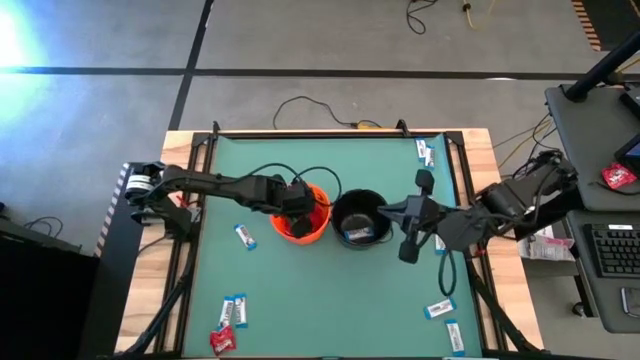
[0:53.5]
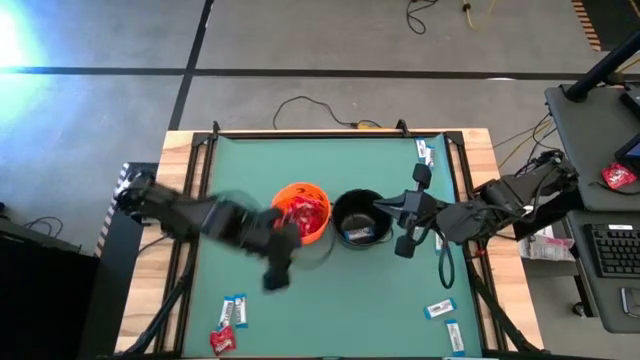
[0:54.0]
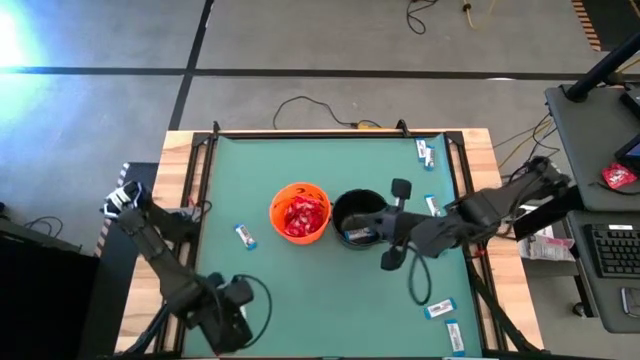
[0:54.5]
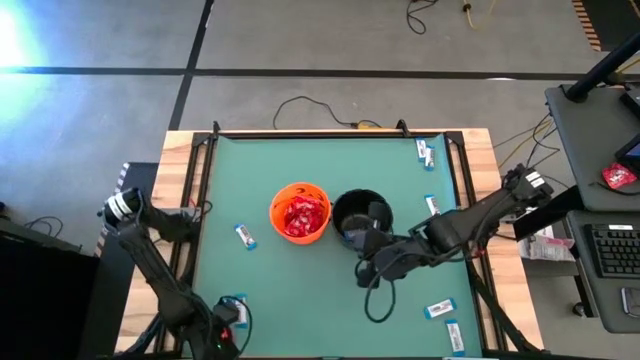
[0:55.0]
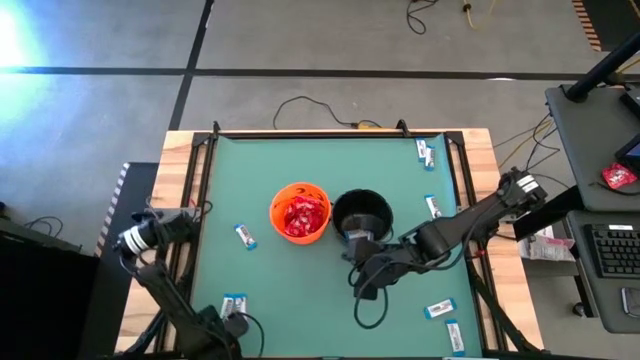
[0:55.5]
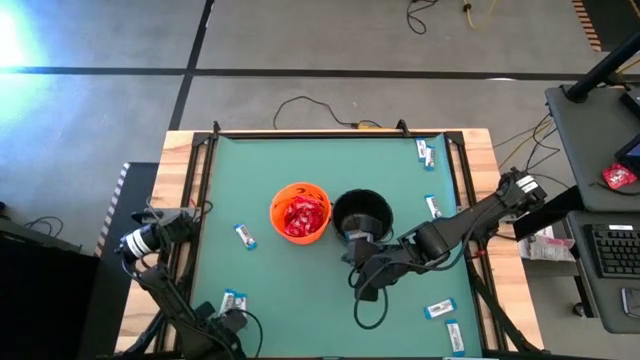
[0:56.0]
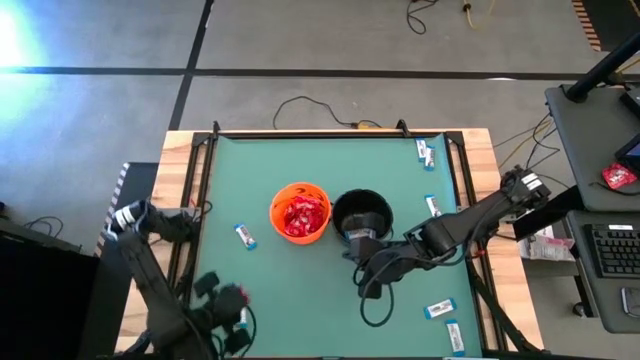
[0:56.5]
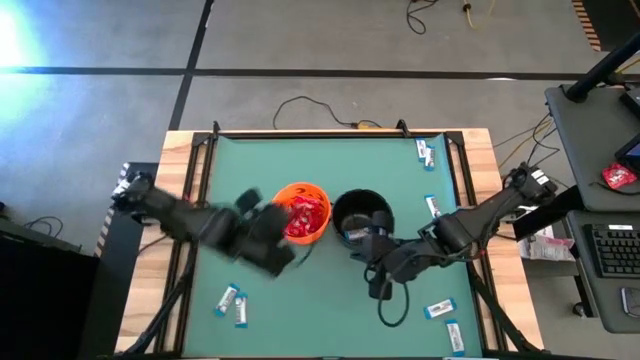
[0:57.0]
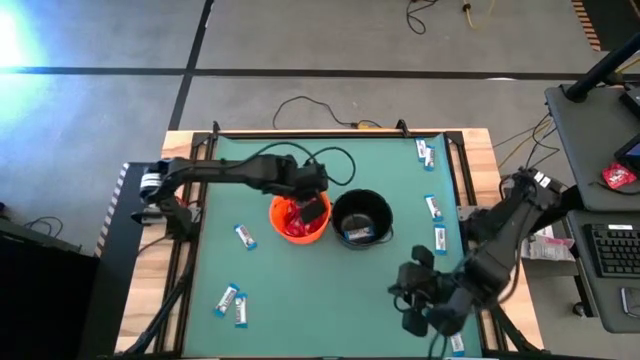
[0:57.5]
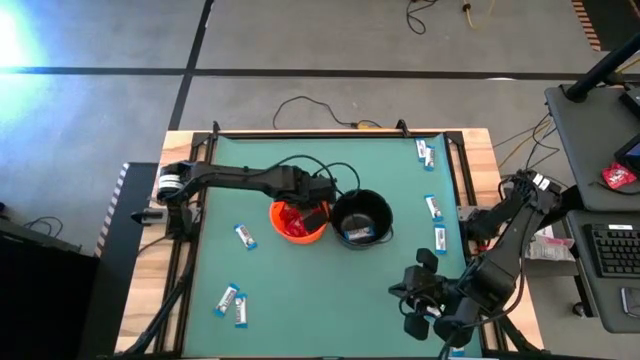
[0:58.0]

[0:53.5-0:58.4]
Task: Sort candy by brand, put in halloween buckets
Put the red candy into the orange bucket

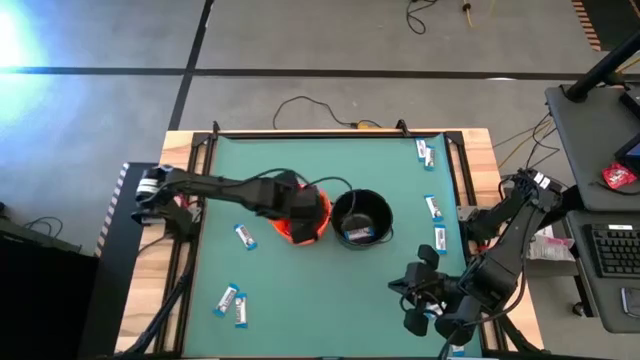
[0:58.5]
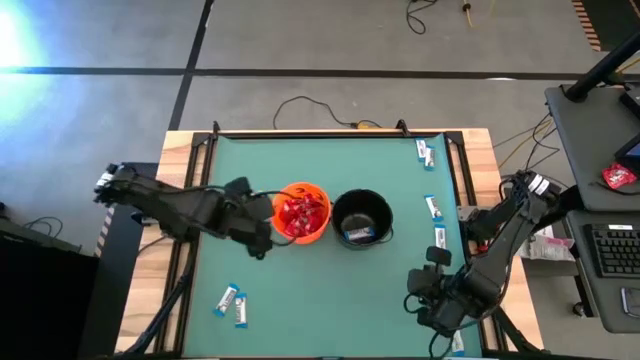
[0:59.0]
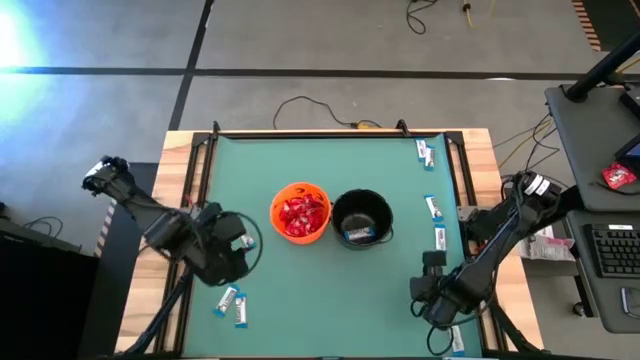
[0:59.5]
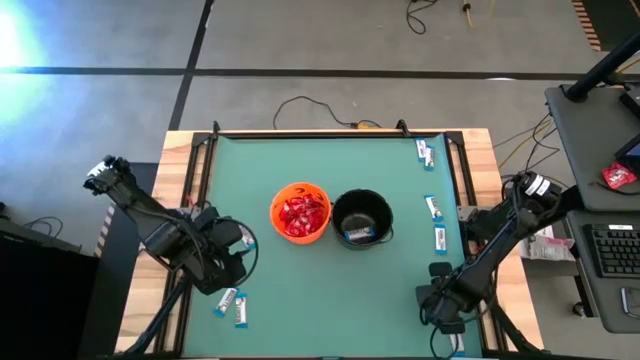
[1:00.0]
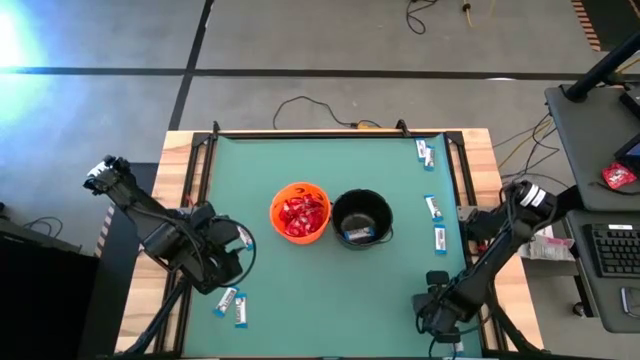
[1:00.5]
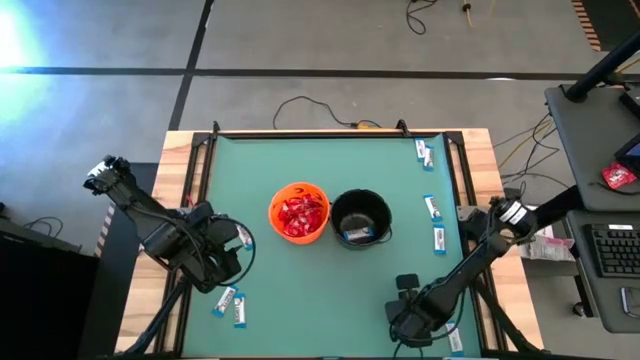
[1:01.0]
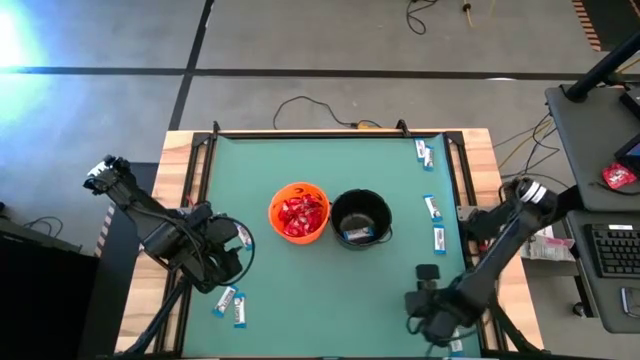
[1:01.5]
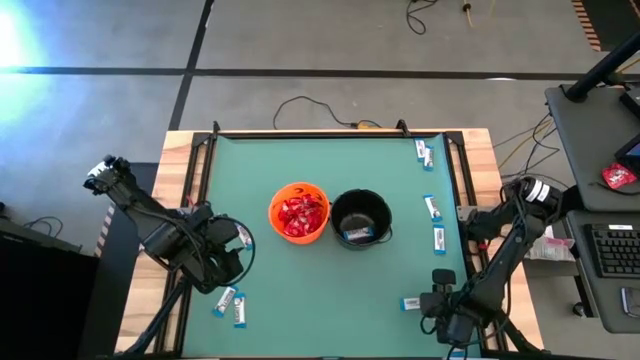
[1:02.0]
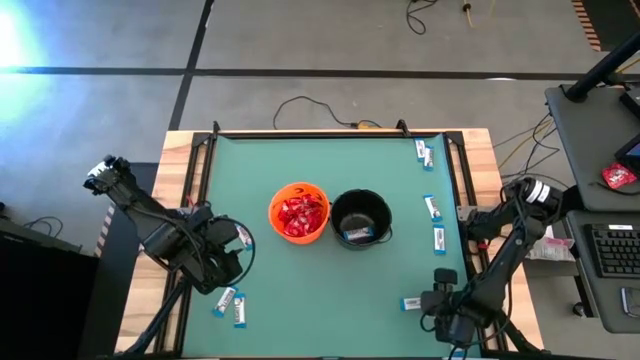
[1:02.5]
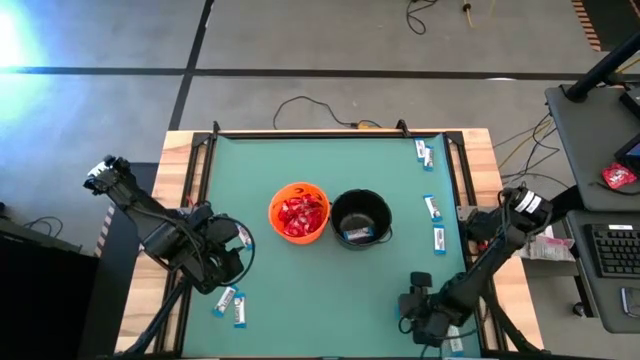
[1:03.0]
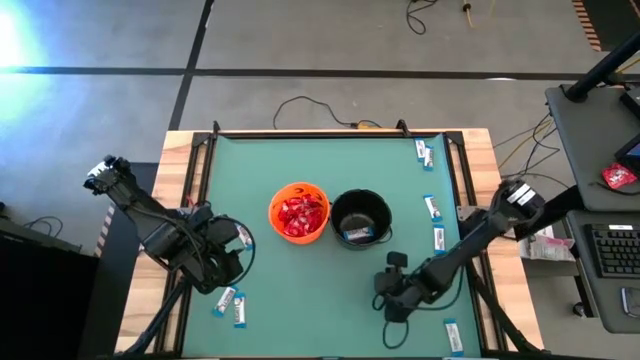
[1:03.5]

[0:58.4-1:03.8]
Put the white chocolate into the black bucket

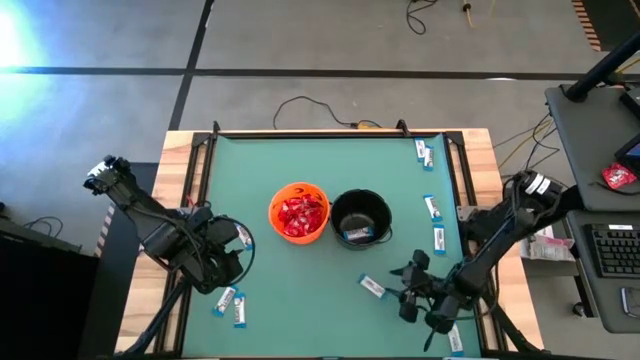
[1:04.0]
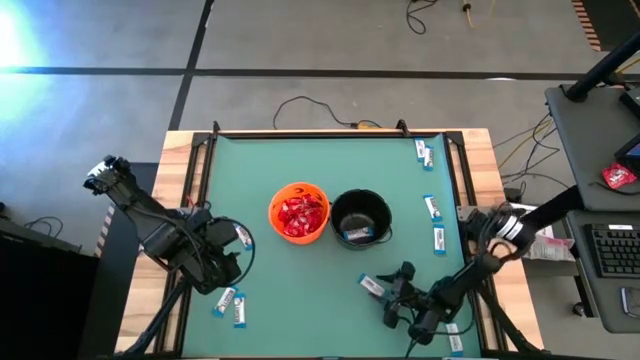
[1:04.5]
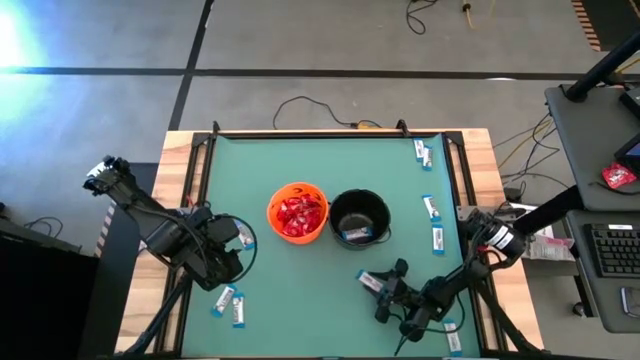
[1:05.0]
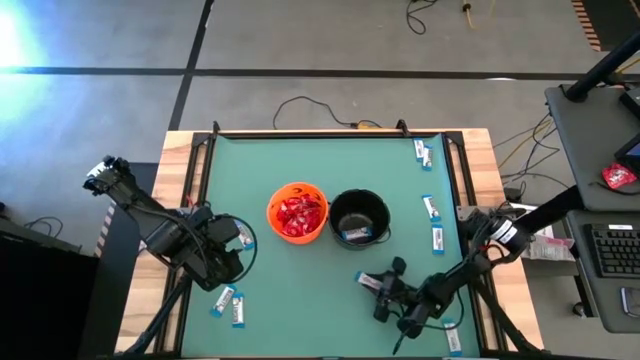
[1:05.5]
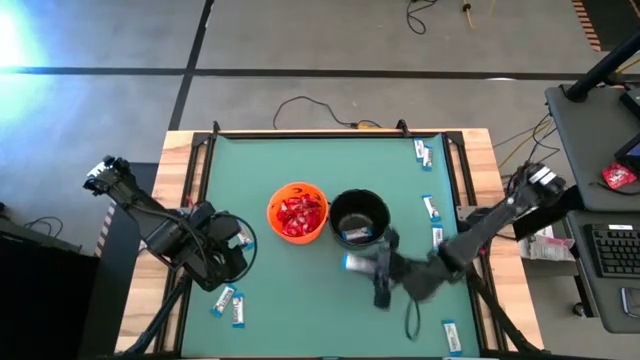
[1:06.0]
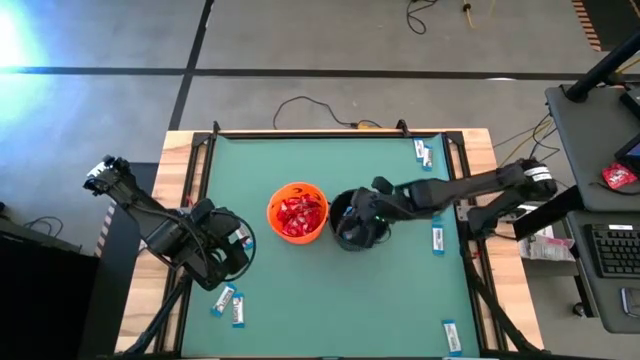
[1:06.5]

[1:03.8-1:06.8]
Put the white chocolate into the black bucket

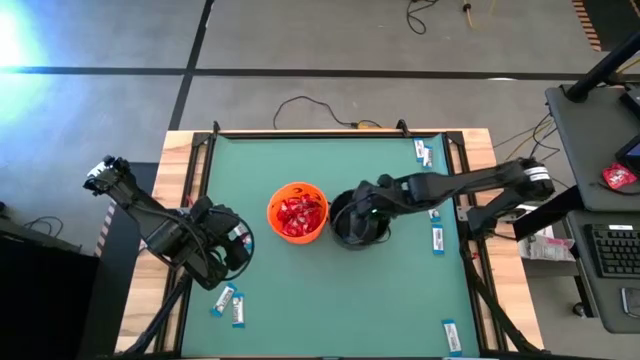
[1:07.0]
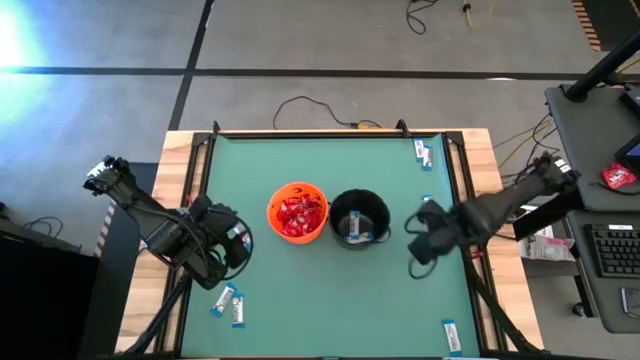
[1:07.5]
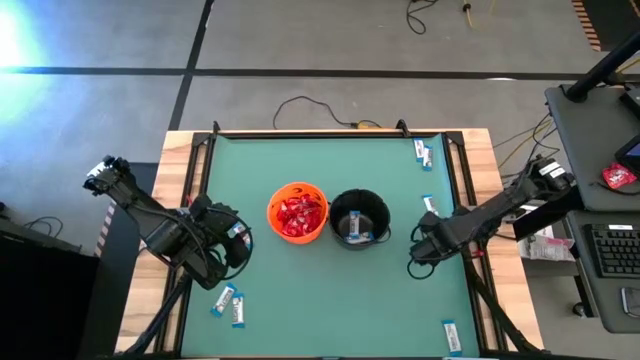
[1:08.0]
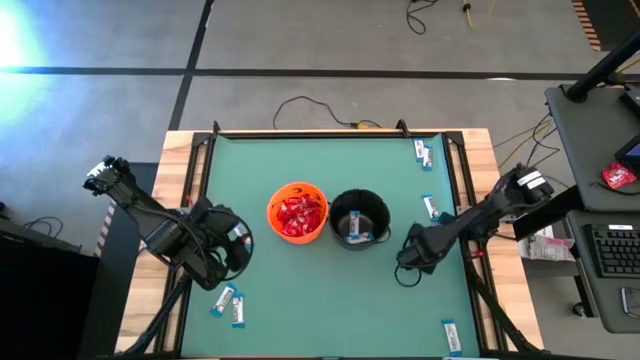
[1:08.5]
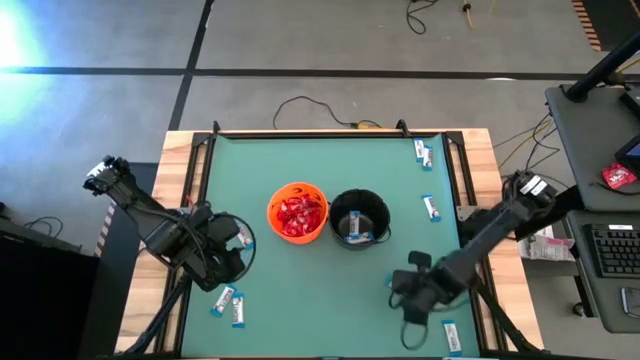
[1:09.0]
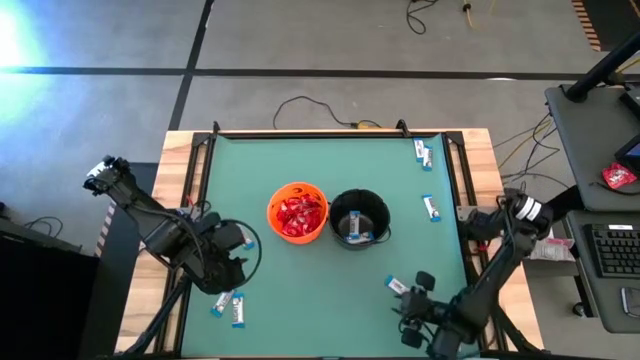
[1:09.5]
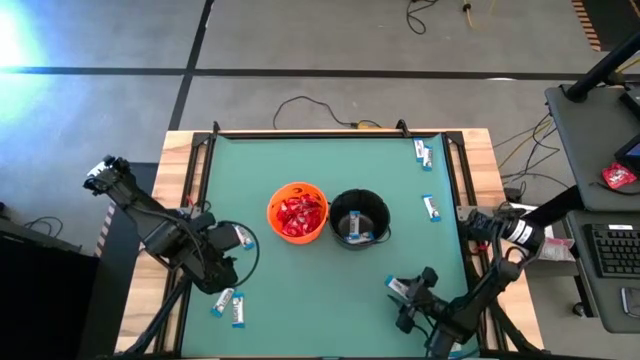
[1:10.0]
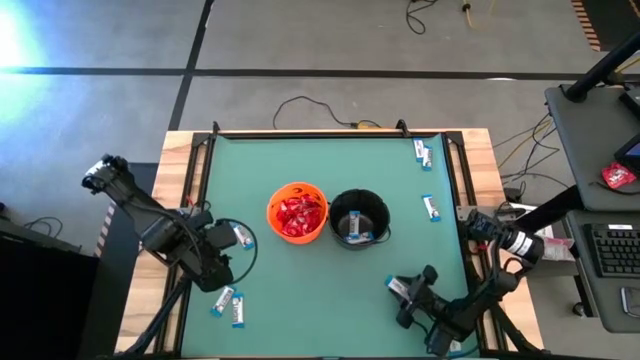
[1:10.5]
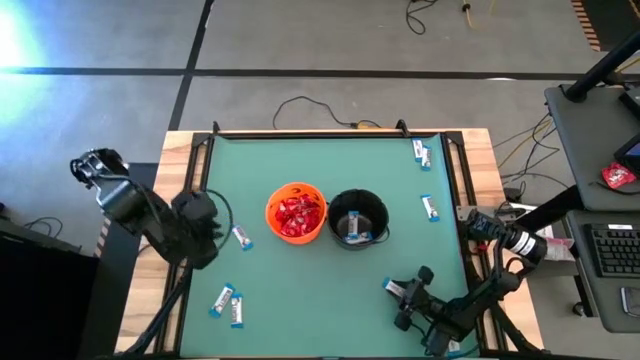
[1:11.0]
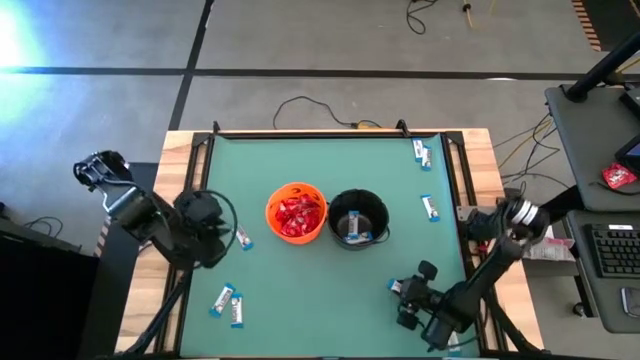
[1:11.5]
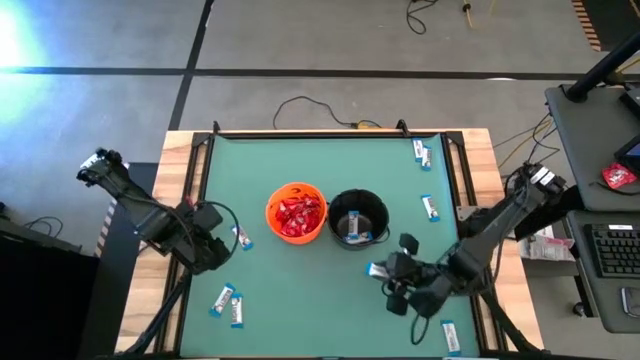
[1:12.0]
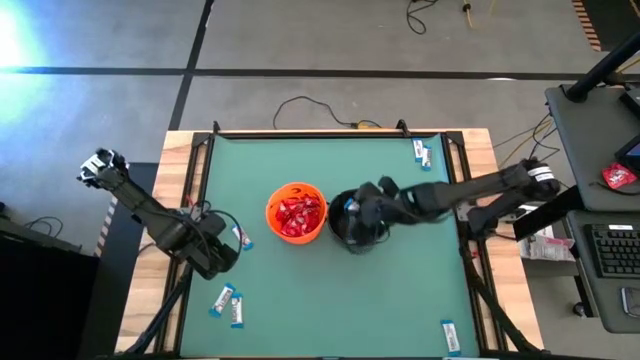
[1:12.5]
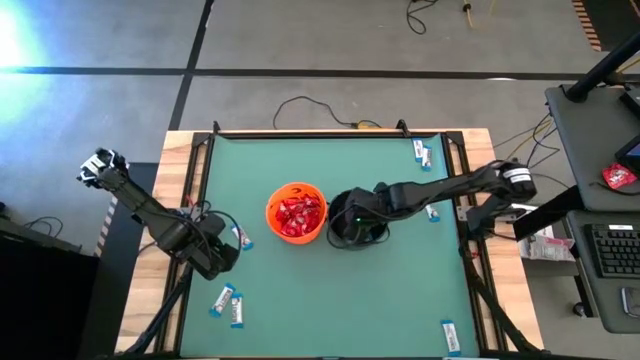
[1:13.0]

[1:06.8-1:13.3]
Put the white chocolate into the black bucket

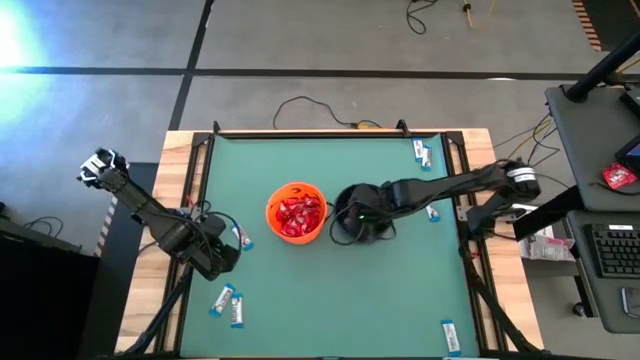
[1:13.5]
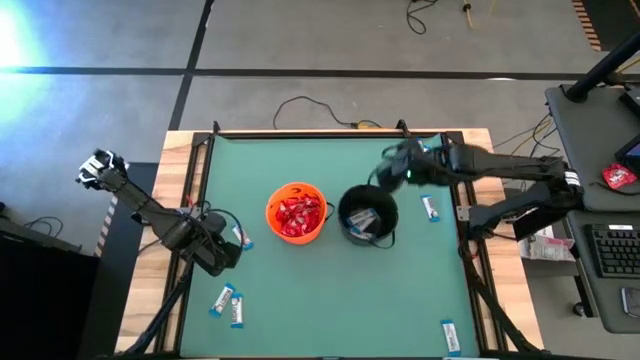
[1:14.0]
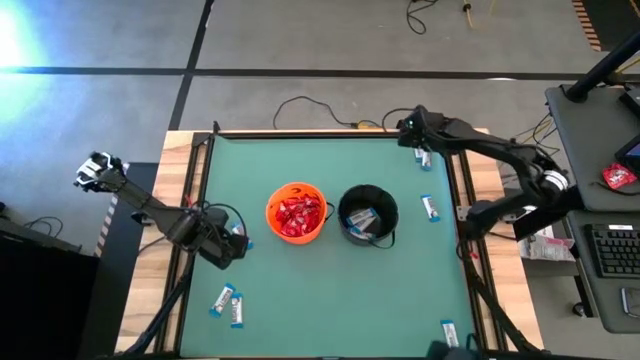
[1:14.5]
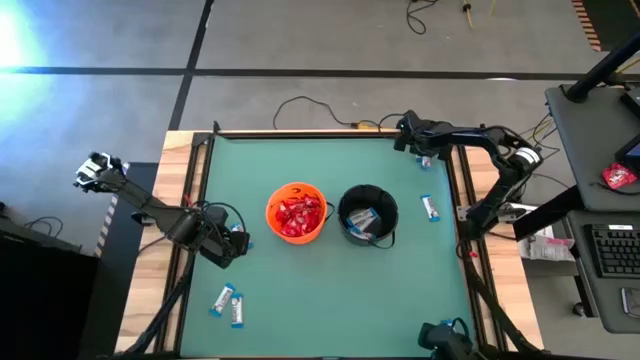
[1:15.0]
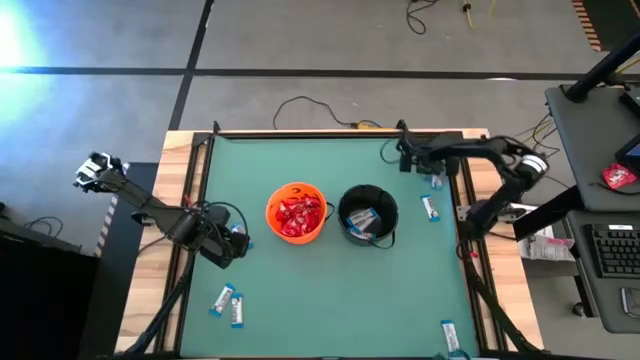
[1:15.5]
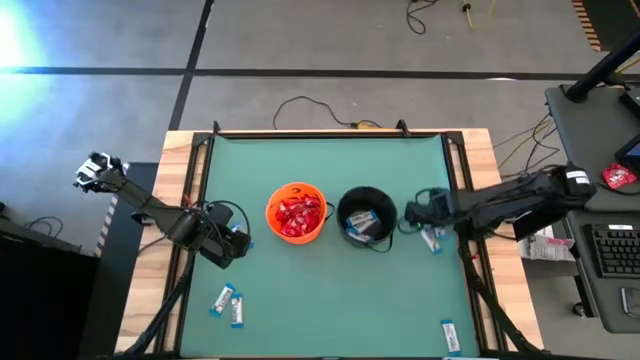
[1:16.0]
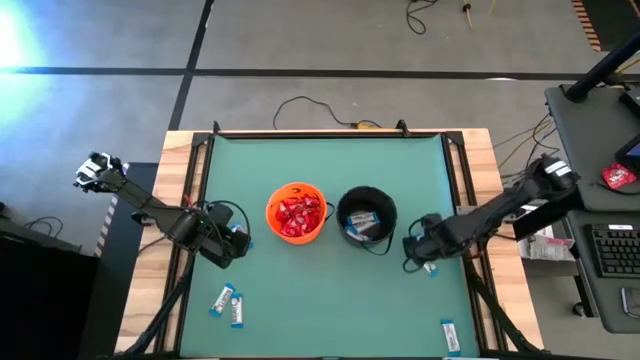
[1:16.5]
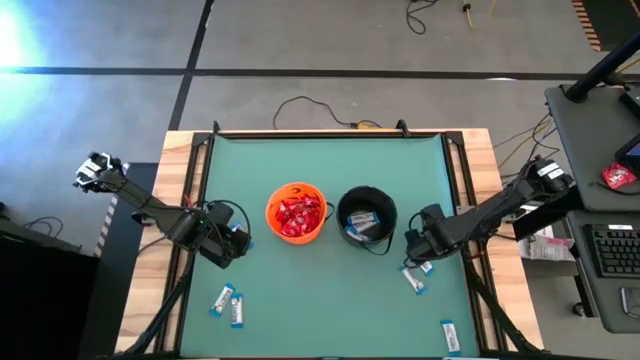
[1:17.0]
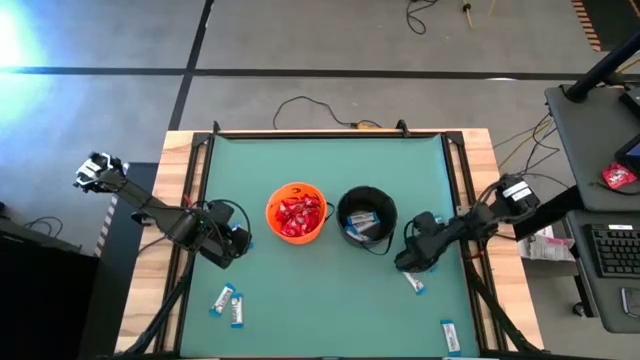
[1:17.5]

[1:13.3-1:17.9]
Move the white chocolates to the bottom right of the table
